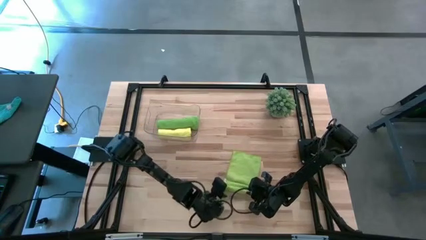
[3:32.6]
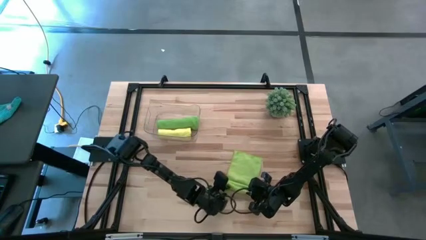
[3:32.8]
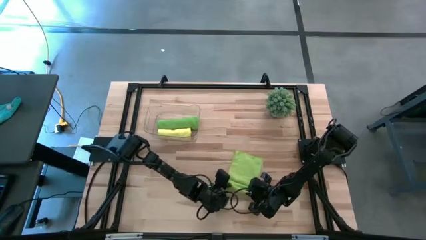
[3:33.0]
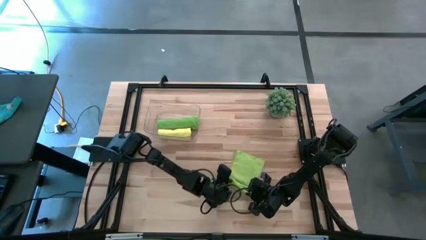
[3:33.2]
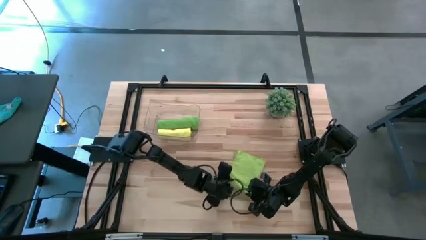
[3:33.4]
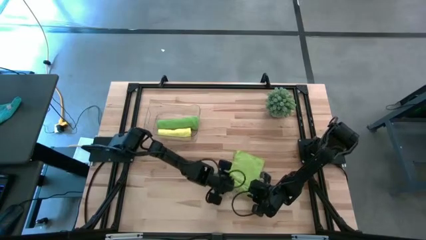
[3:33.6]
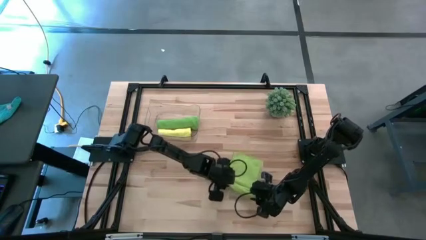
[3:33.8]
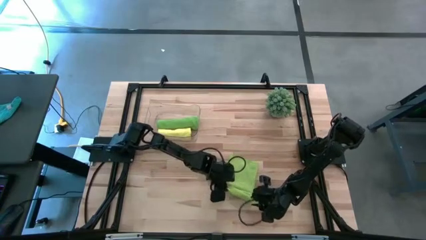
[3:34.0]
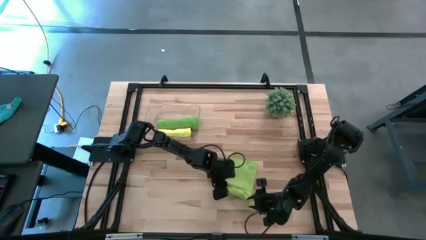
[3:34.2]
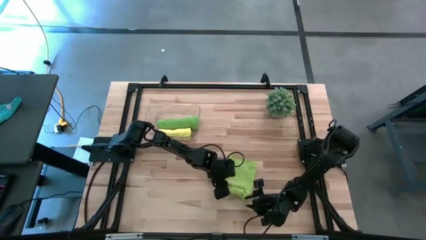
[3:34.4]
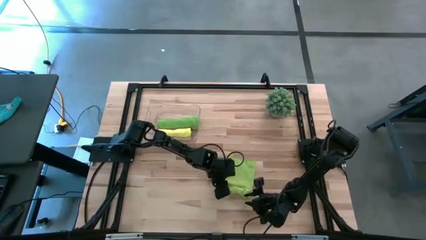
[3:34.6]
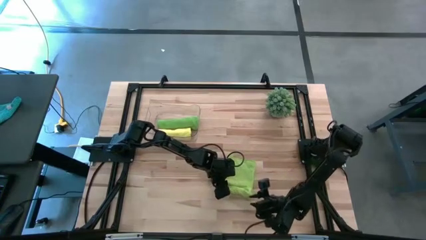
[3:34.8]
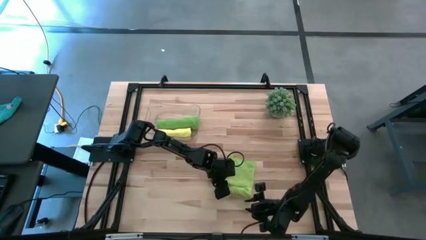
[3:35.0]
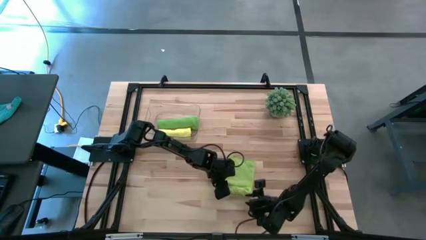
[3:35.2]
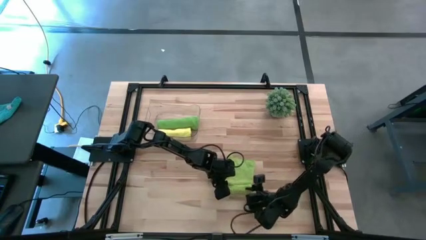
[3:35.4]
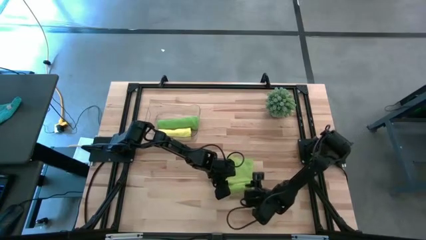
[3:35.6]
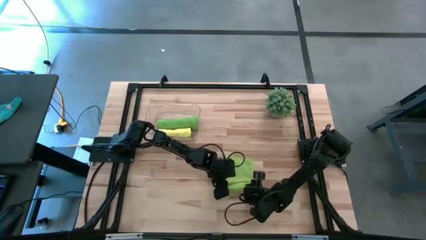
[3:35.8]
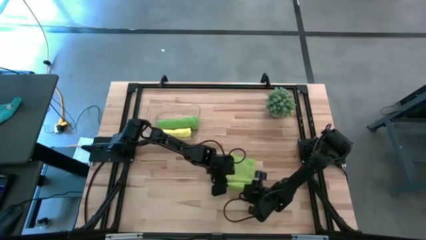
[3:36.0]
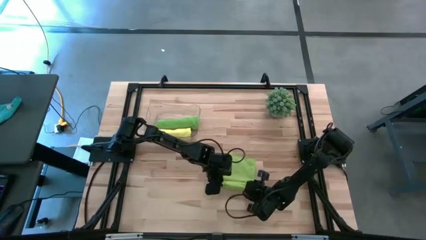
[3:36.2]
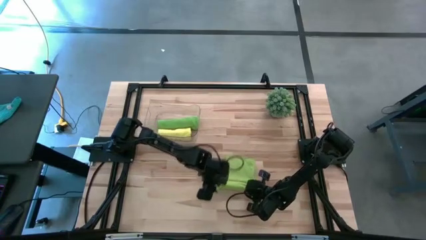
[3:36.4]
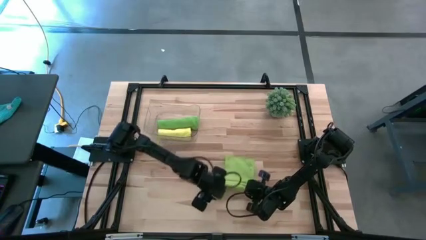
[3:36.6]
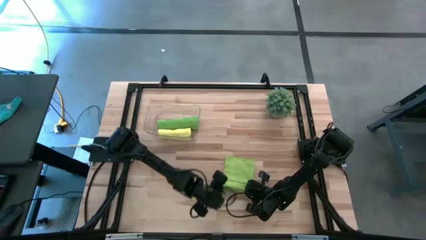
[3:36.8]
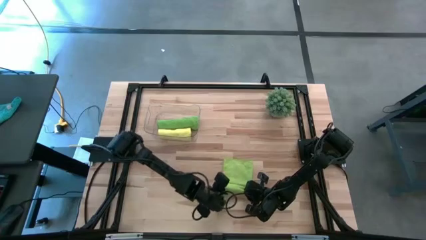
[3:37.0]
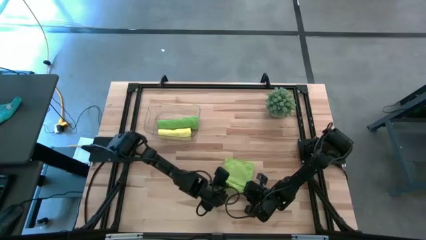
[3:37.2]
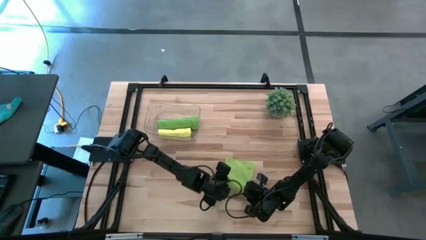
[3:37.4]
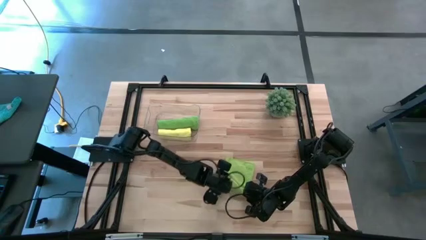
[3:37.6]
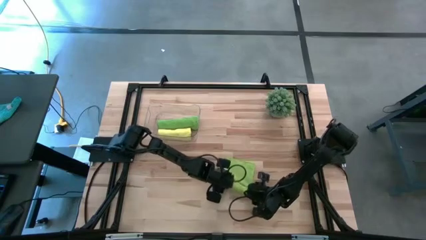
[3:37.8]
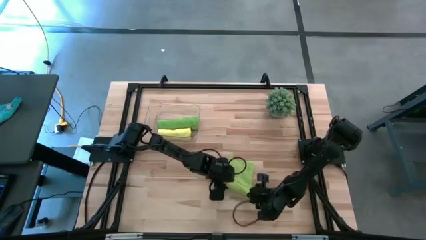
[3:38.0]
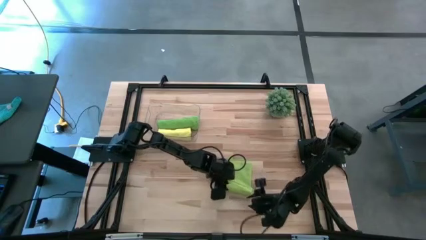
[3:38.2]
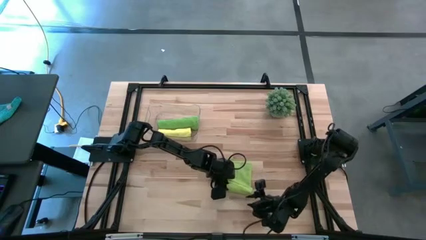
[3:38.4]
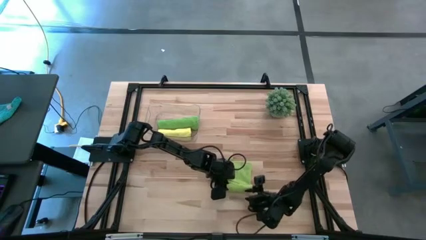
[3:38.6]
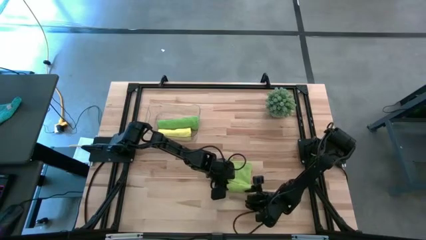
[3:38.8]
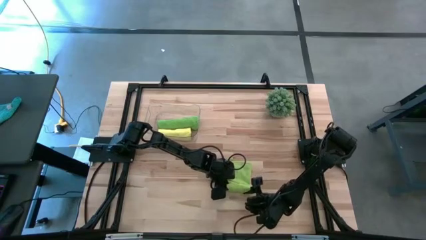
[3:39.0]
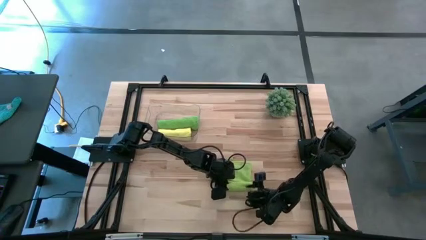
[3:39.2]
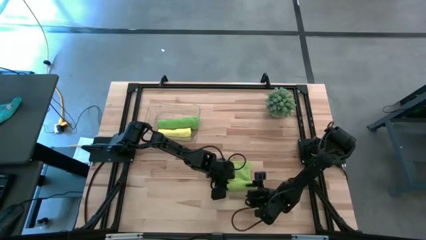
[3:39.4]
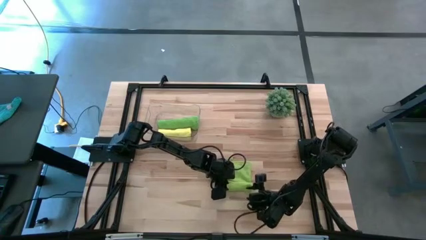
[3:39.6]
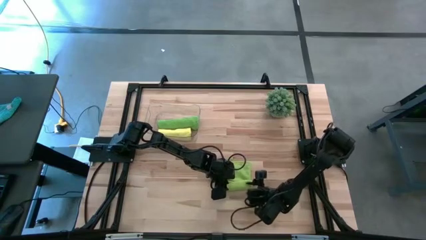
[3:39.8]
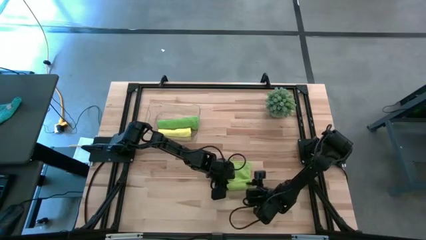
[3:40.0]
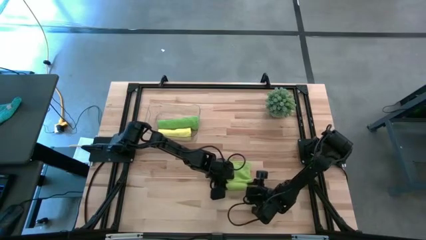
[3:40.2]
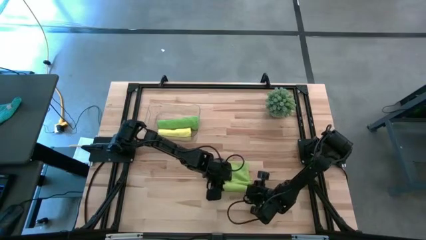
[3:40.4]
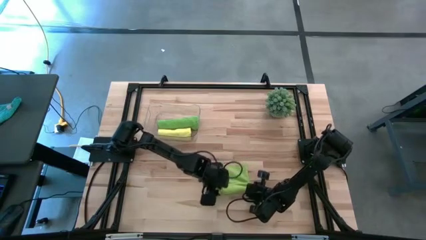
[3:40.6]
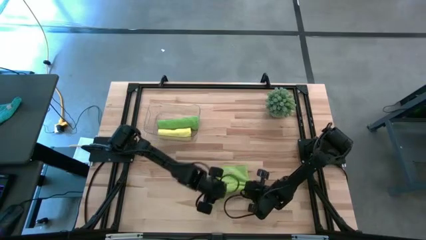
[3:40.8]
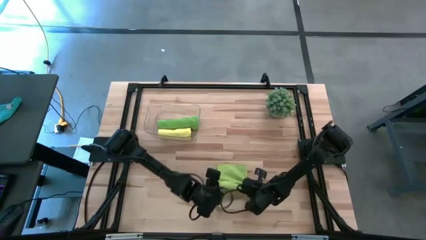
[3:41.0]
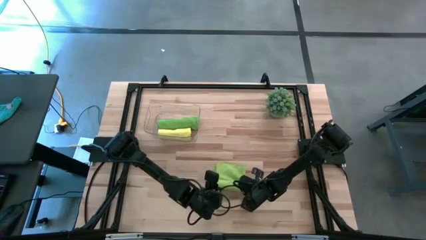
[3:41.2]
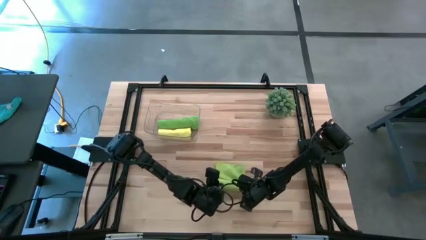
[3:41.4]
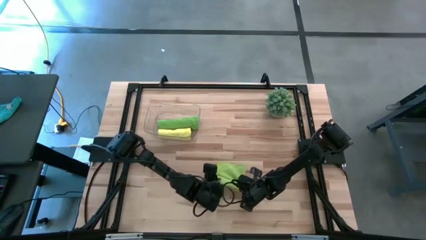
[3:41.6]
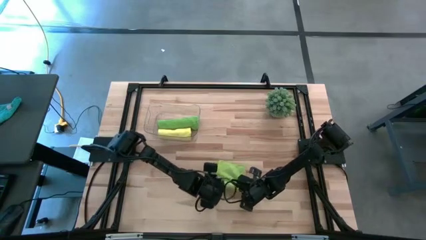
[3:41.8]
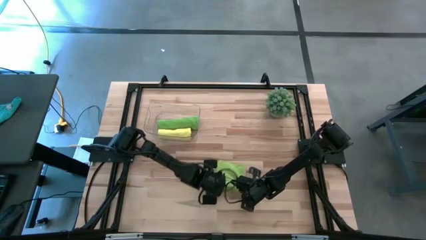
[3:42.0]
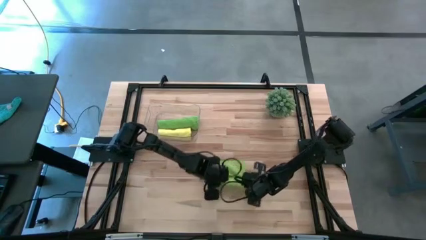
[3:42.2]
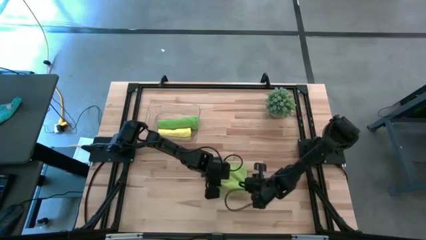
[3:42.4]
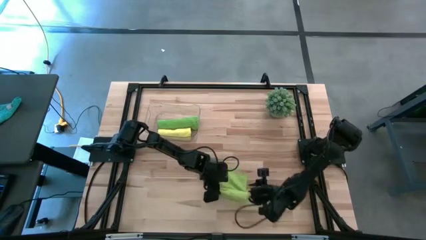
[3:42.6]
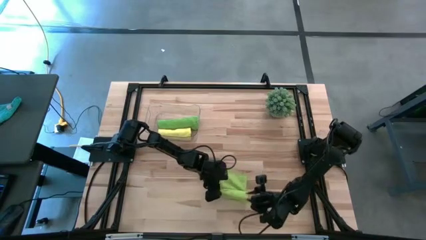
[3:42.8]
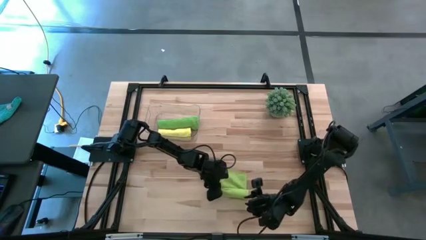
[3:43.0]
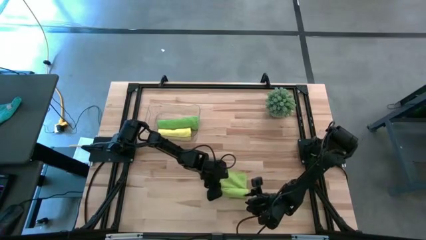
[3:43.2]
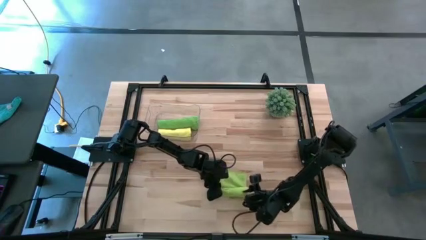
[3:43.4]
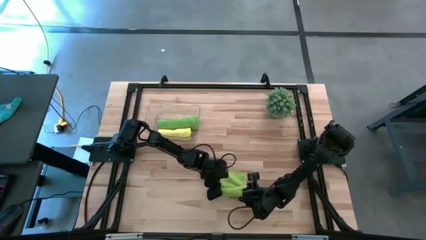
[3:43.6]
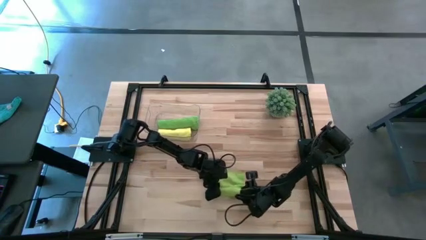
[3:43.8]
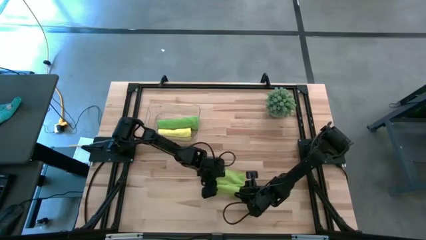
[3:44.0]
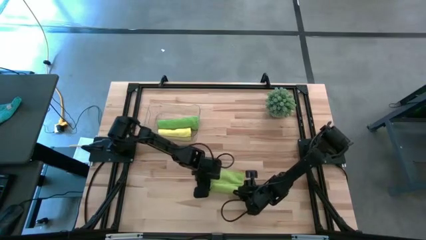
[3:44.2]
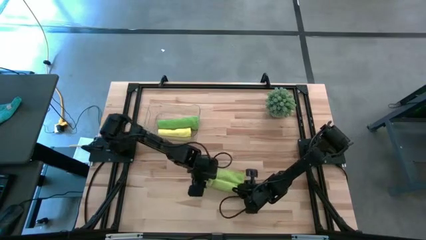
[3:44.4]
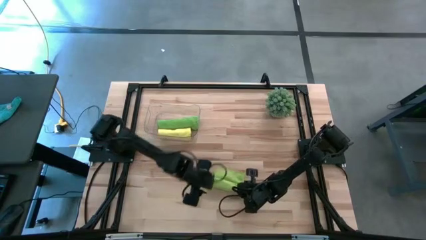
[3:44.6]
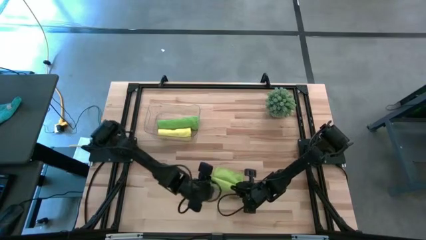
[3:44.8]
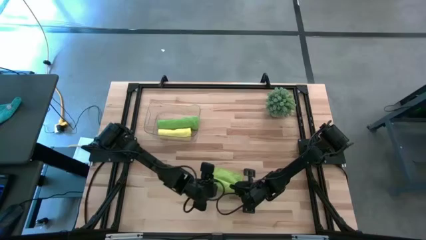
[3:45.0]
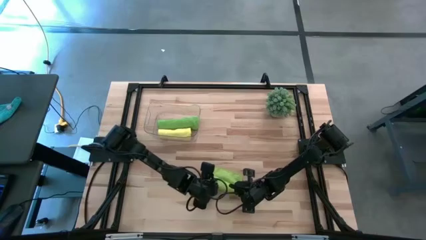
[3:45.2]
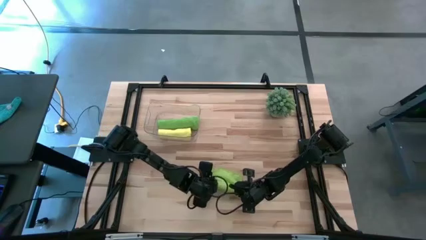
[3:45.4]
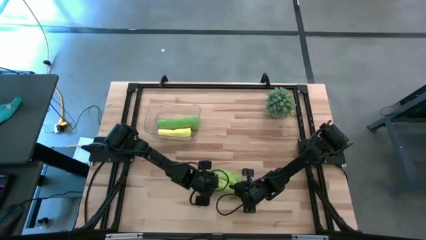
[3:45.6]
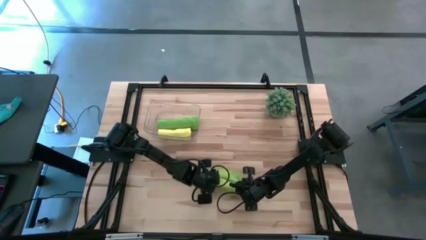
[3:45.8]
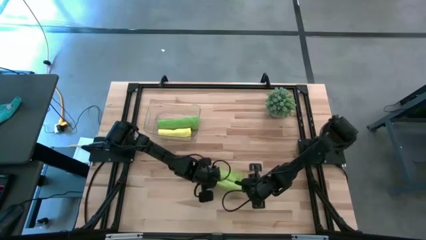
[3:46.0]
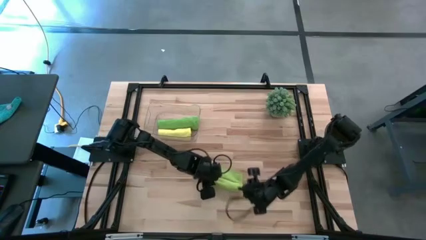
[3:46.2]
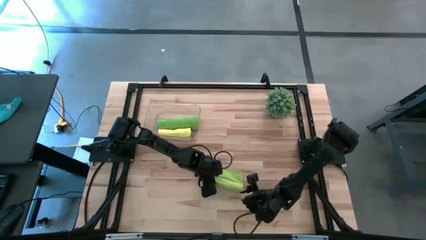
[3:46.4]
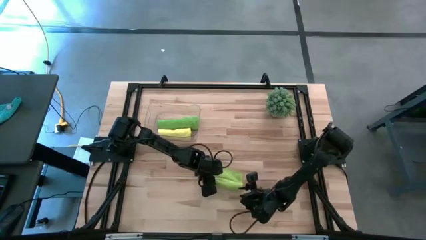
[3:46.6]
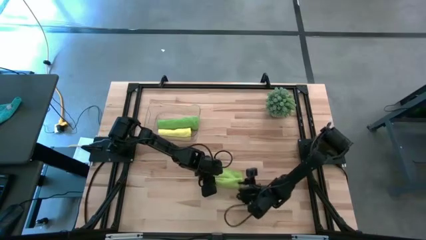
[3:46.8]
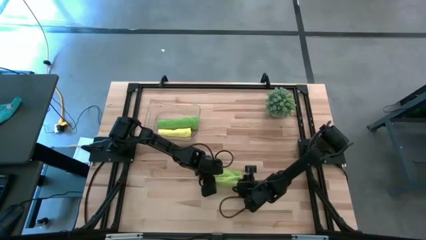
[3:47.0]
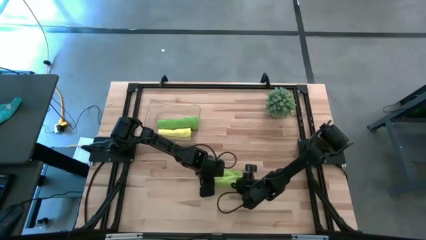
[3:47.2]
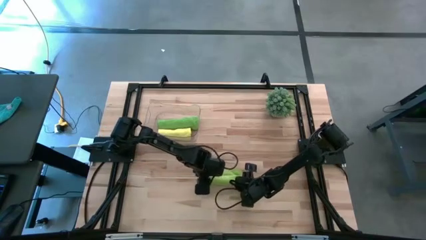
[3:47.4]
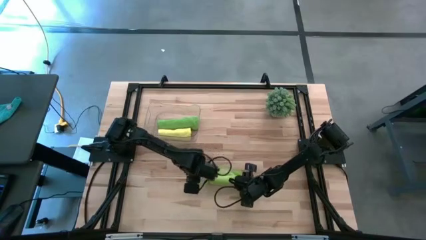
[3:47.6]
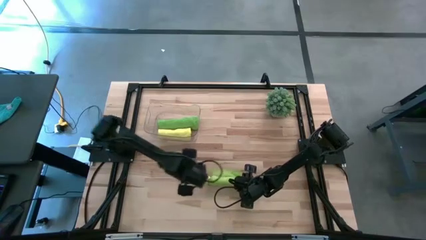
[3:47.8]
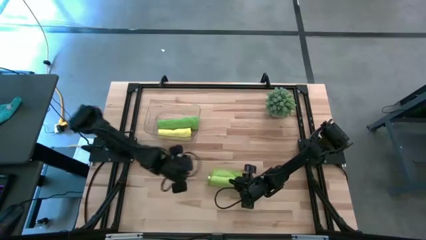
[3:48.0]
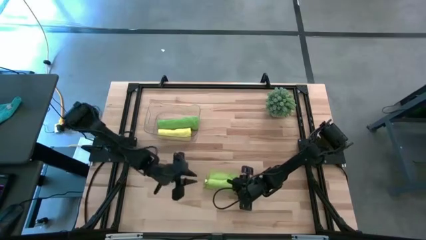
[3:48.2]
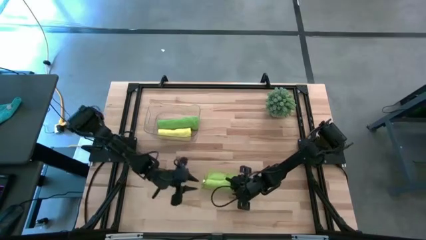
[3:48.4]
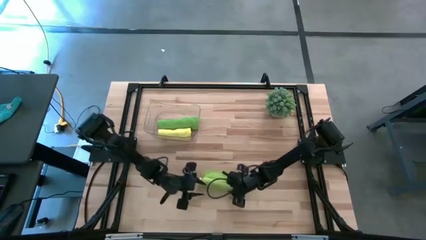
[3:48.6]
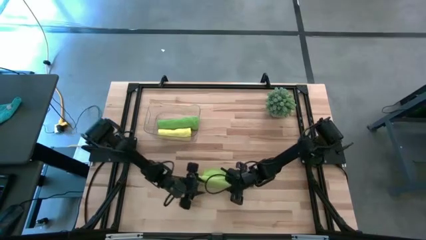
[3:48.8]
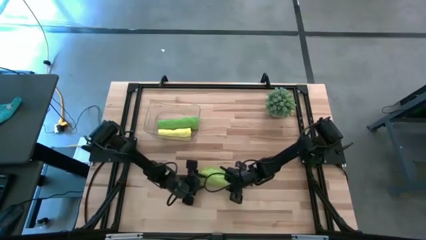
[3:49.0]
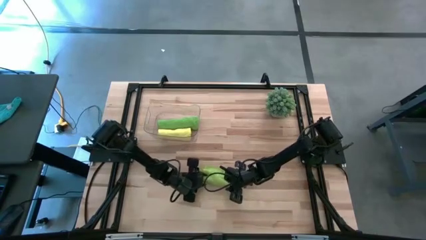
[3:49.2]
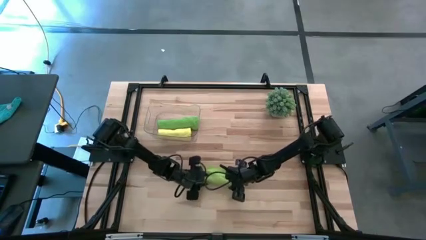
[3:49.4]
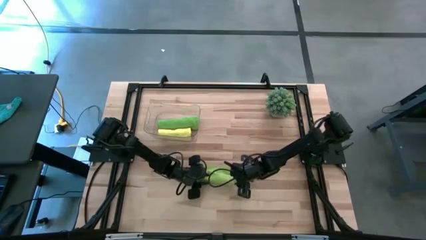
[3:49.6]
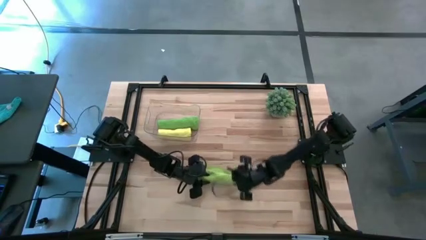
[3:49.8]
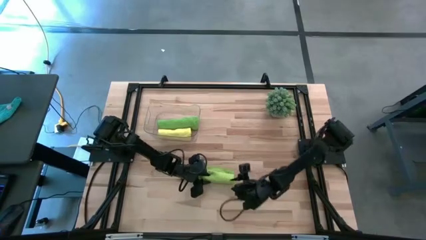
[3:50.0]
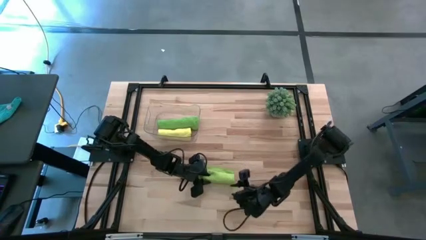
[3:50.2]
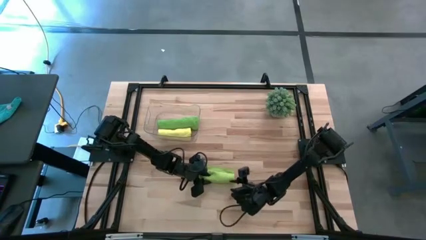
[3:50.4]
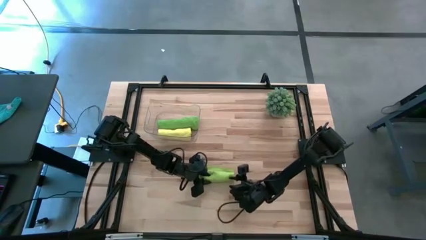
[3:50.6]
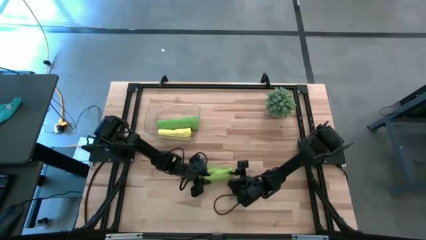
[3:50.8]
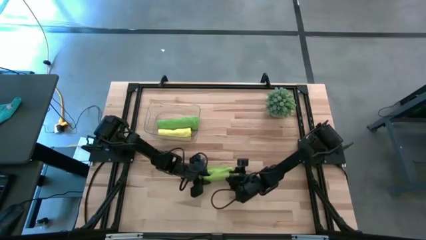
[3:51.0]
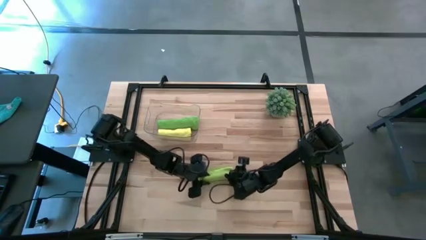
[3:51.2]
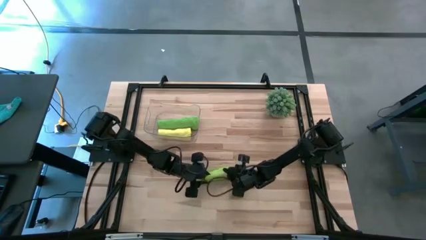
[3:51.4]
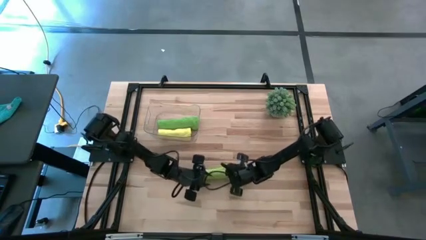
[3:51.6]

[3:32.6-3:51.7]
Task: Roll microfiber towels into tight, uniform cylinder then place into a basket
Roll the green towel
